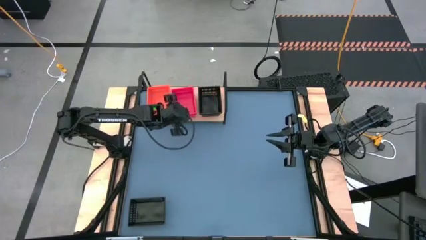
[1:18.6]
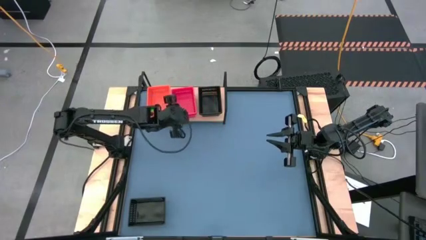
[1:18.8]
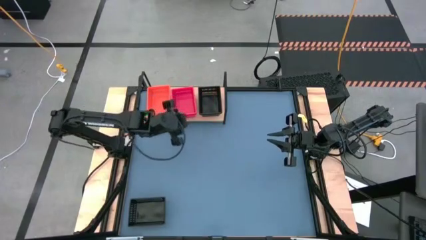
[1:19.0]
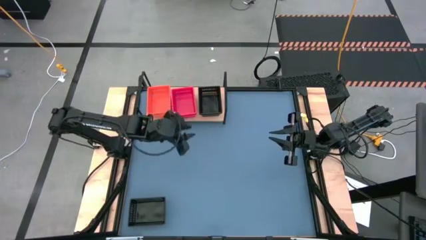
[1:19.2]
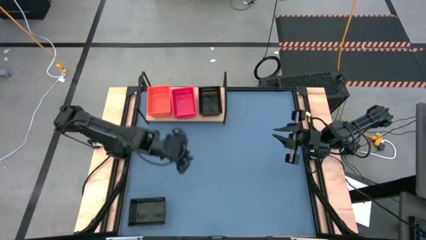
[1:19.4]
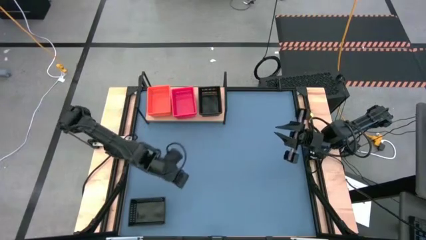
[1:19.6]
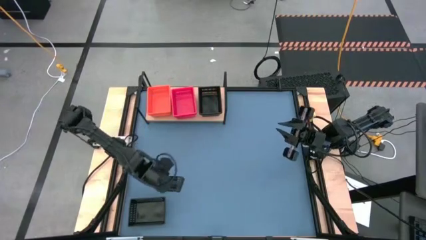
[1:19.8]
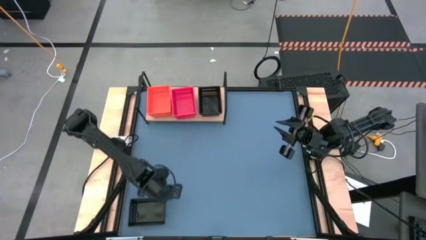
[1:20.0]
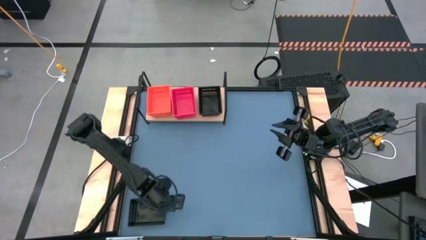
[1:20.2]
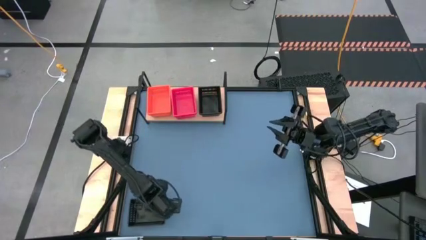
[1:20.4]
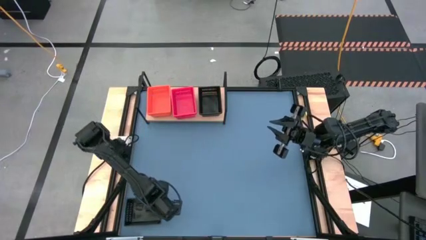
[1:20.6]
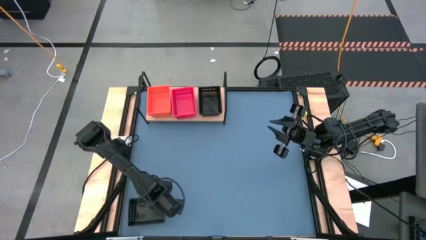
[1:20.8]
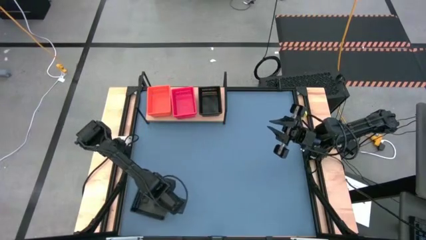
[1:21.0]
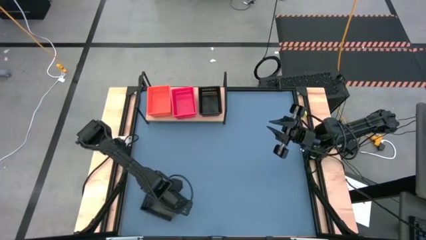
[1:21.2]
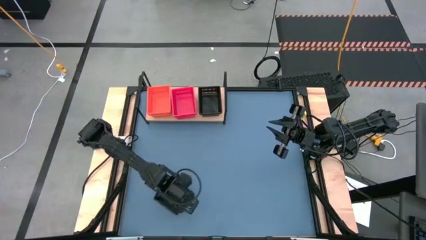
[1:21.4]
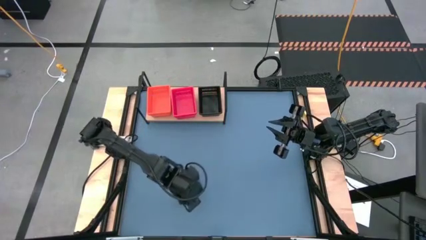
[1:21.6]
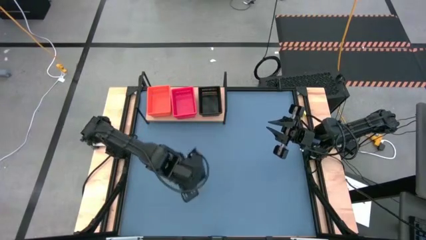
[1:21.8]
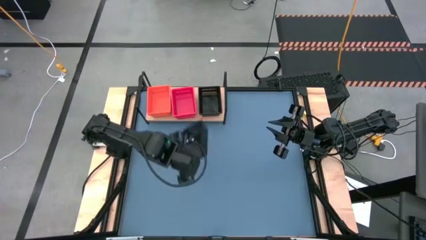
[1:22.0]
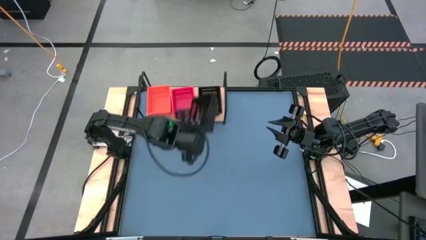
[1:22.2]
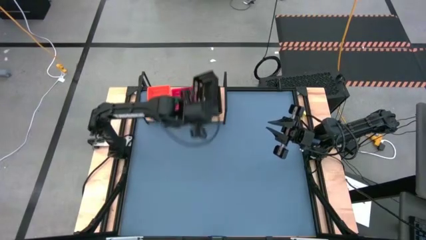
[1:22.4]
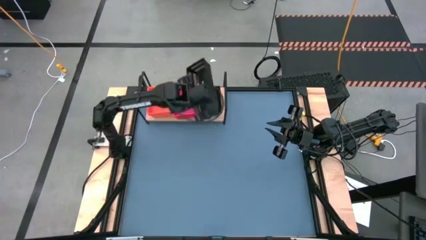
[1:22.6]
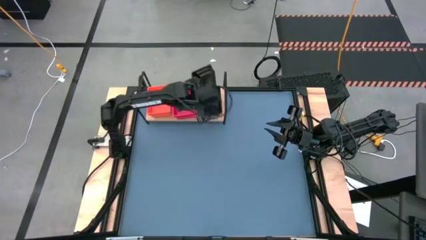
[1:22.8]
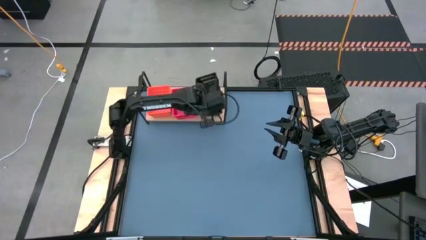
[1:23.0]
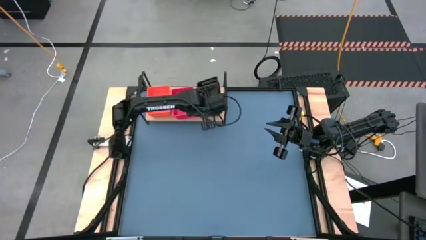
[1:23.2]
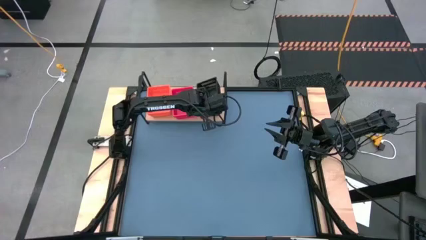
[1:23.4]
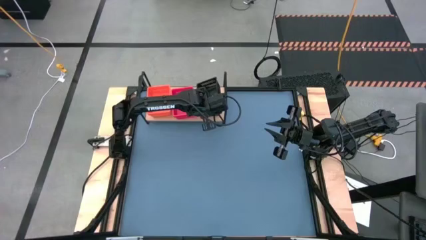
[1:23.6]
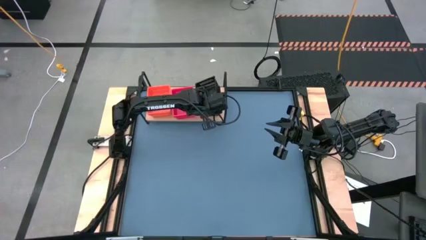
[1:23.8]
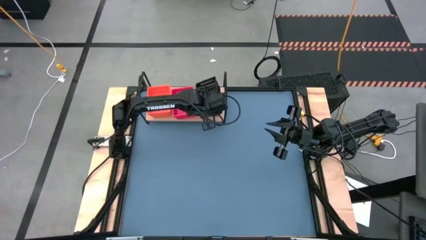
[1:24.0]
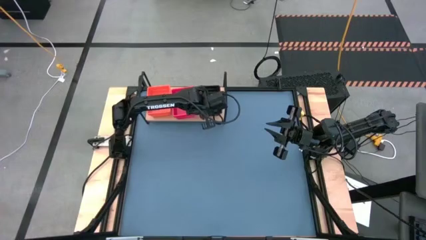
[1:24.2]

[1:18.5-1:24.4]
Task: Stack baskets on shelf by color
Stack the black bin on top of the stacked black bins on the shelf

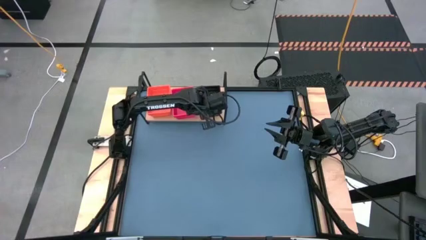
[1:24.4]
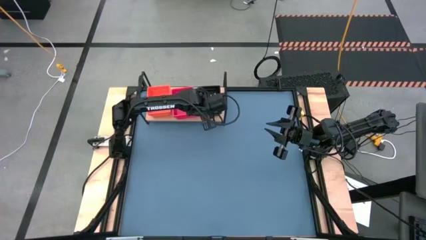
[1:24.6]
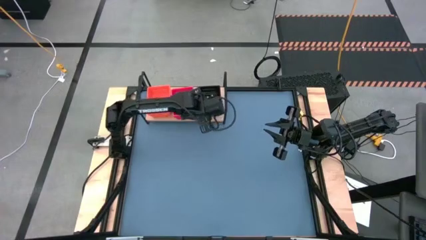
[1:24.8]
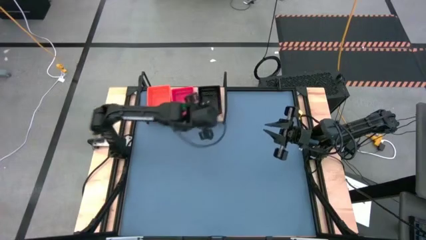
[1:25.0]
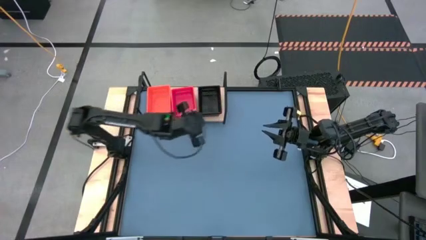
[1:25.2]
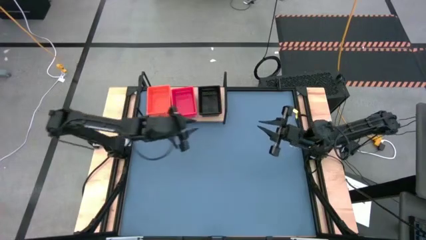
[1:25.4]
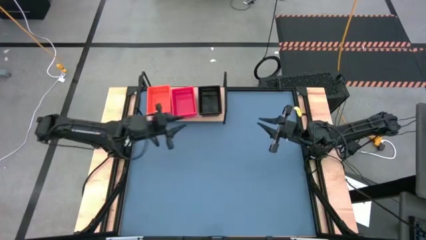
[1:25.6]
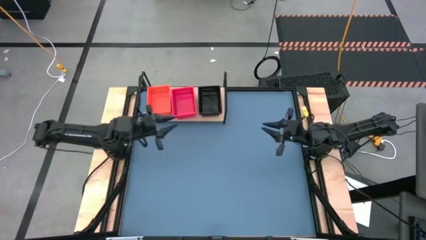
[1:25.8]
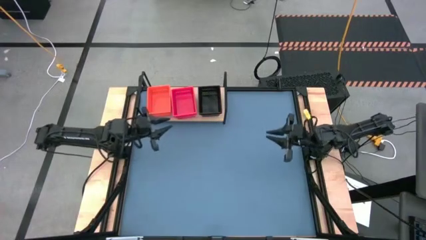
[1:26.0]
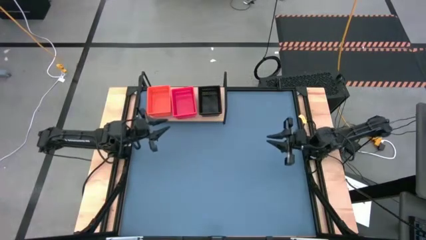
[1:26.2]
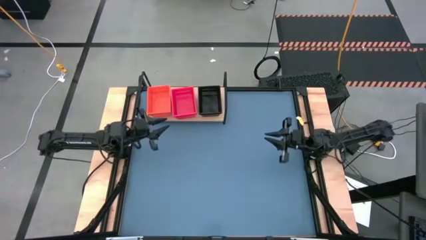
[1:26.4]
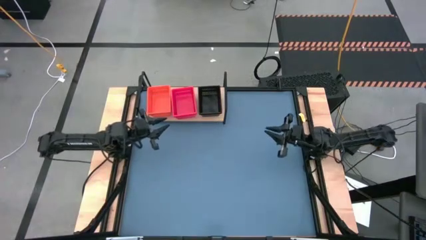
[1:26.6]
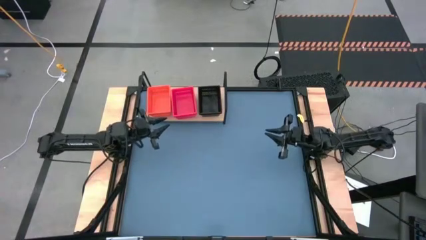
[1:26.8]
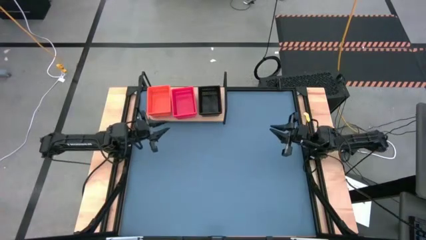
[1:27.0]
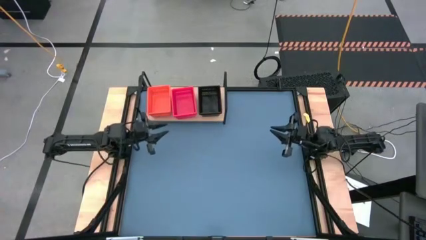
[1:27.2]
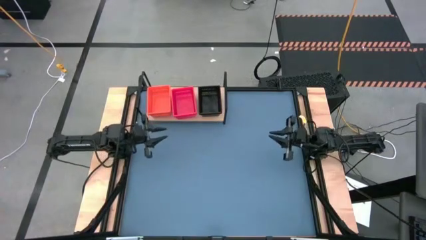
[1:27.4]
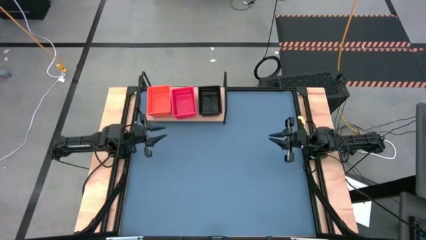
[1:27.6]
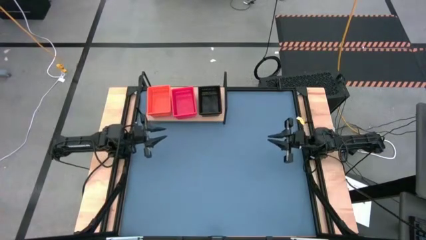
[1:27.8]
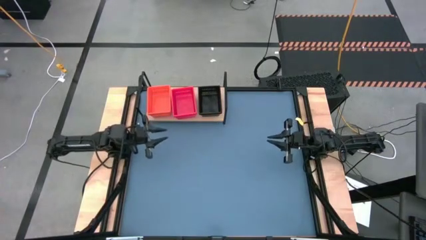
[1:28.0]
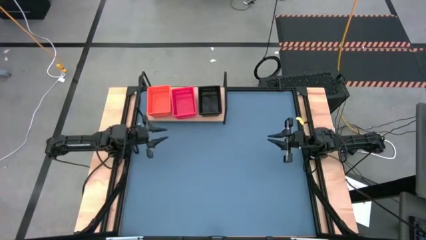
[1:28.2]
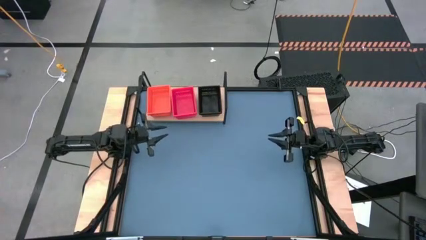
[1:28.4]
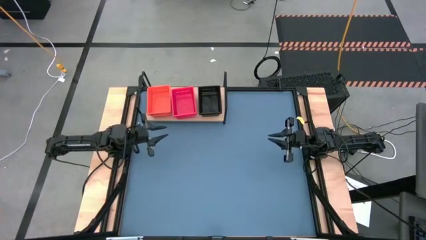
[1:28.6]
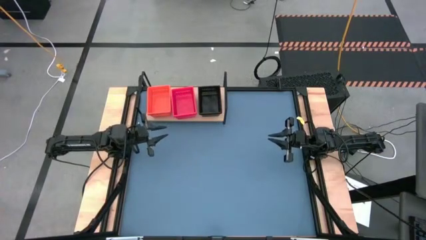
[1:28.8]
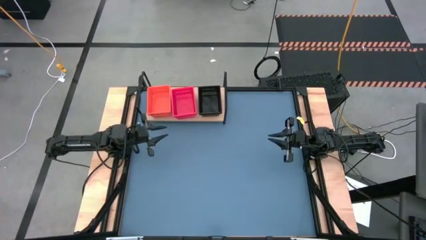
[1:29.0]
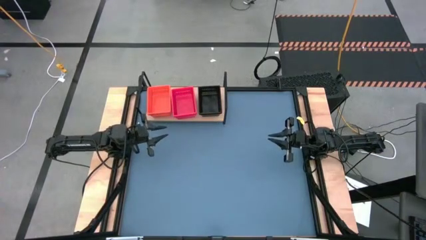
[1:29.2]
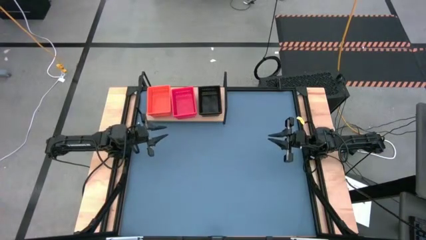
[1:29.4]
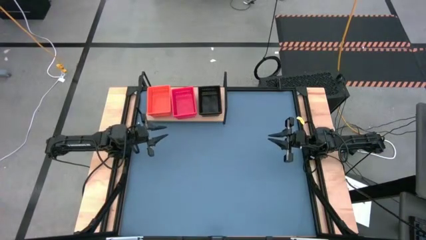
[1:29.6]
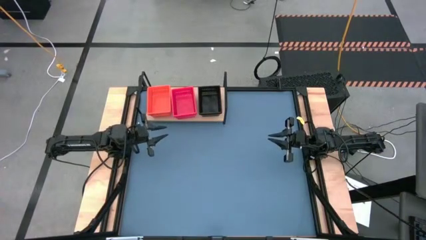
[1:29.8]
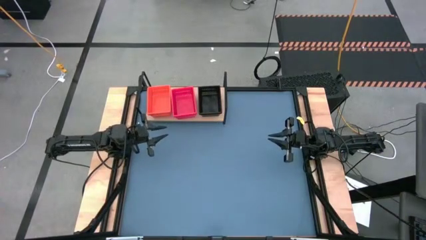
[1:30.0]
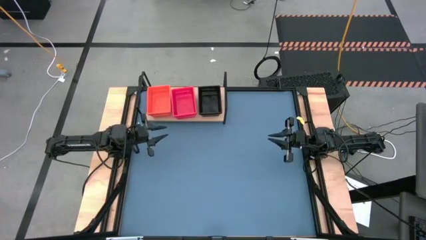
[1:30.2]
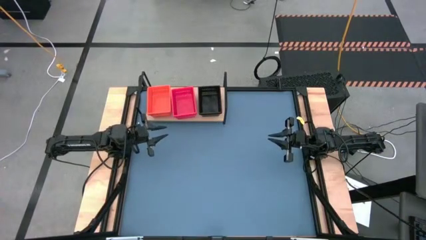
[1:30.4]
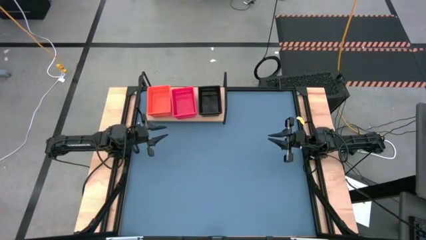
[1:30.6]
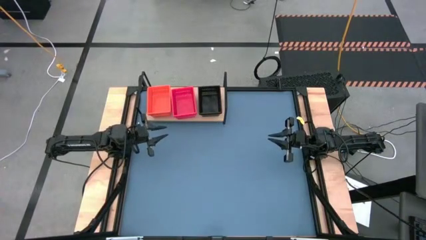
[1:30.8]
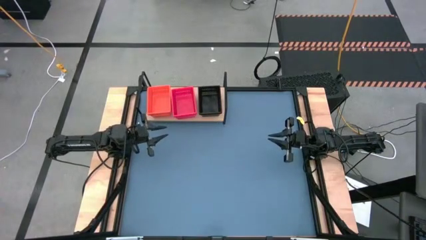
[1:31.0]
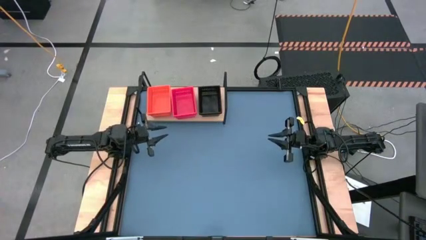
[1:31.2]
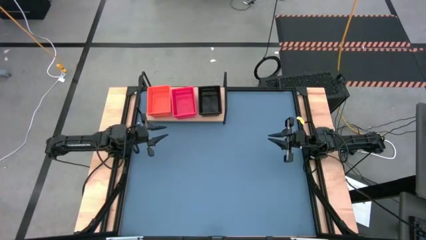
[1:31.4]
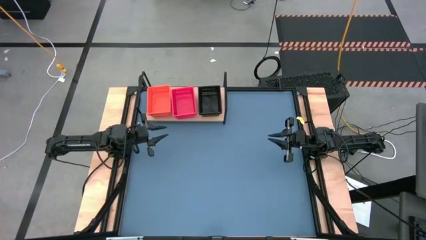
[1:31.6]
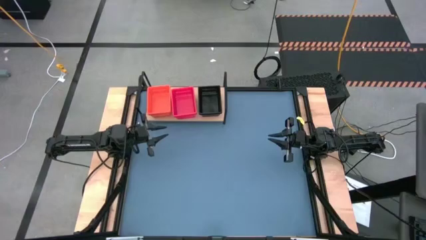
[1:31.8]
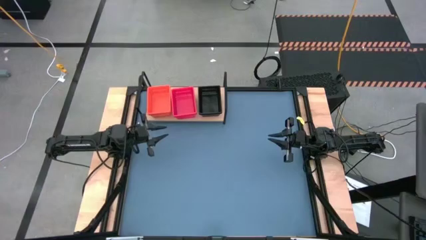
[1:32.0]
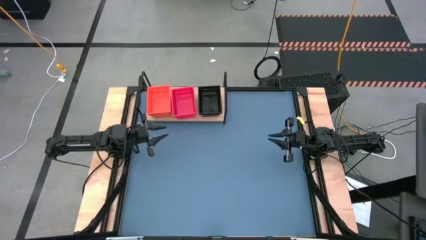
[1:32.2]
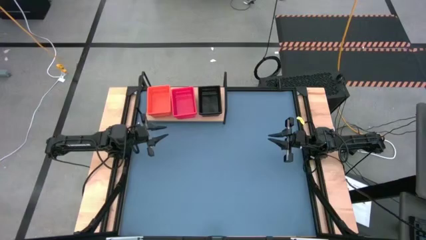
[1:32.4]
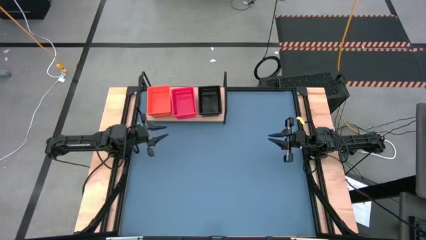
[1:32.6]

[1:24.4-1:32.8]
Return to Home Position

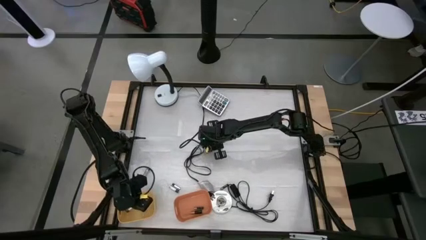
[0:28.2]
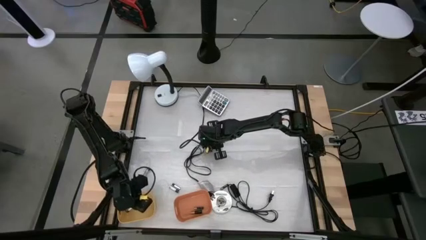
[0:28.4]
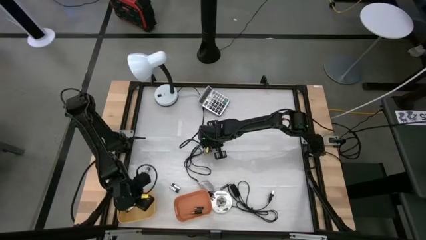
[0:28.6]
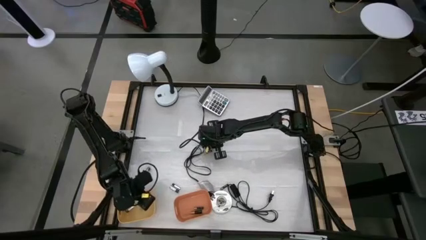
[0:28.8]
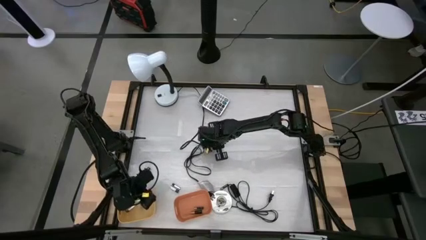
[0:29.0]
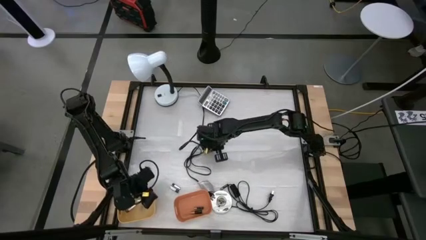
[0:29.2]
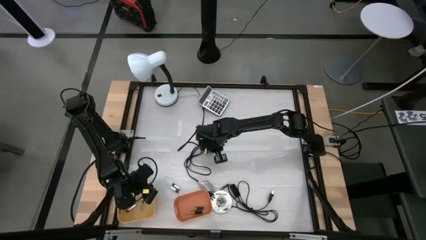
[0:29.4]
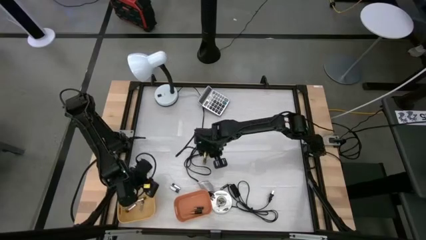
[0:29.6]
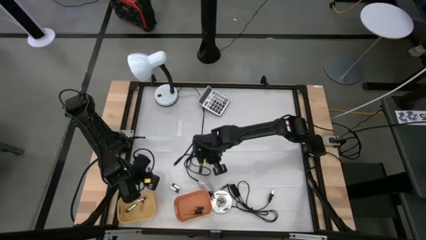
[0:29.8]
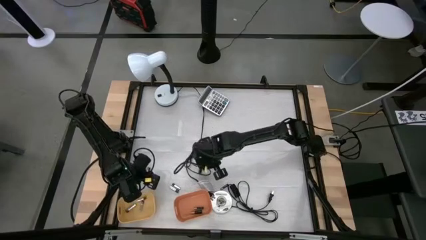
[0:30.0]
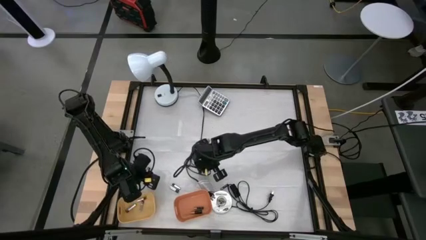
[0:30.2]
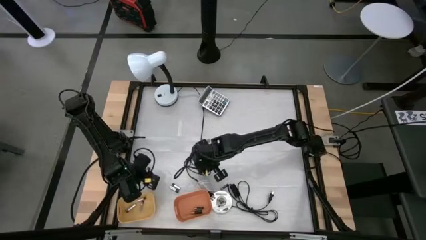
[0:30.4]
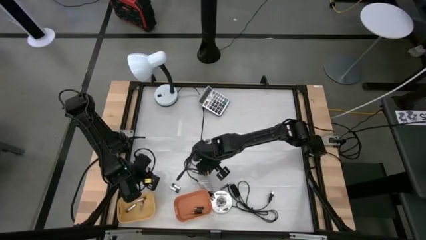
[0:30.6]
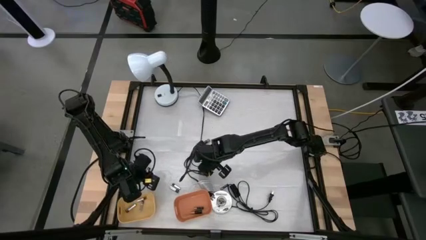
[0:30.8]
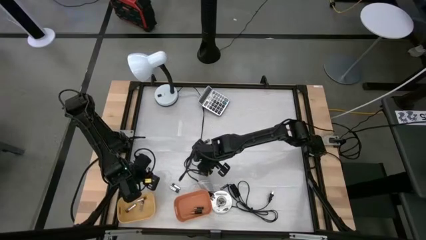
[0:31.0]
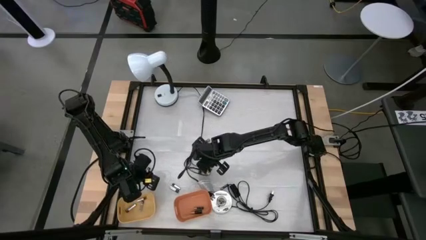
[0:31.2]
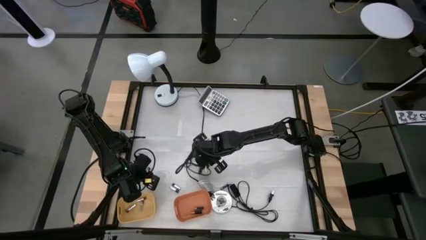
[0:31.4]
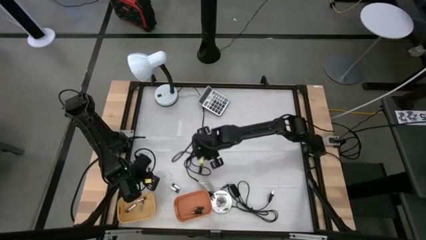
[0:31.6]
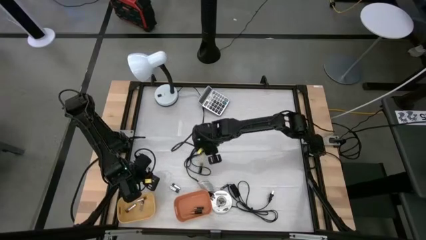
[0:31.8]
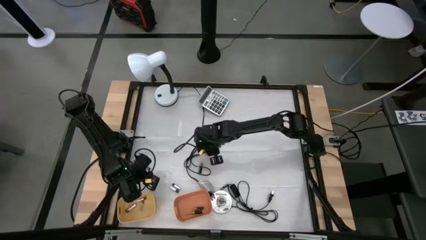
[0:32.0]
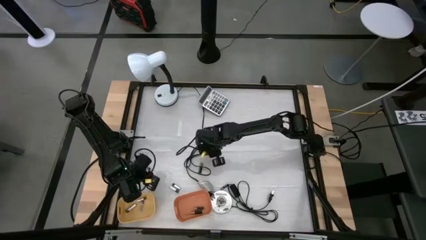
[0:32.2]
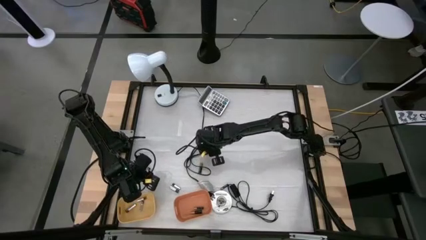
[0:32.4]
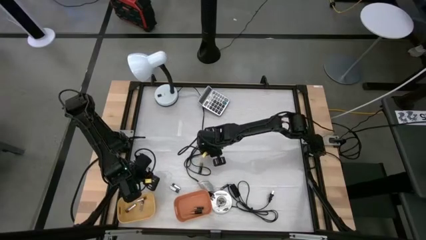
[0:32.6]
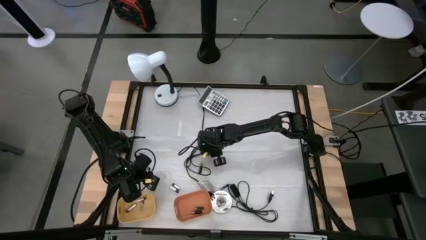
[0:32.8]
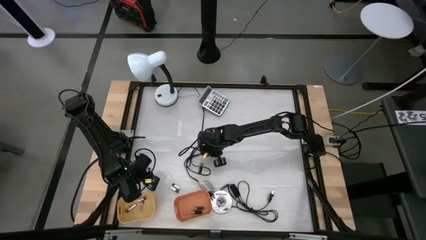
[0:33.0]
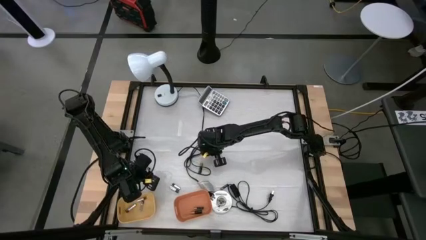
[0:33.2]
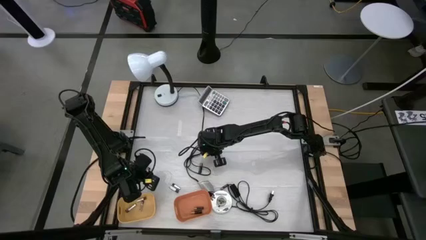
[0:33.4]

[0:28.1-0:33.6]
Task: Sort batteries
Put the black battery into the orange bin
